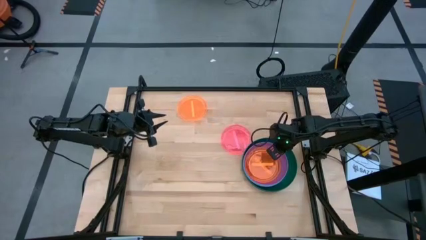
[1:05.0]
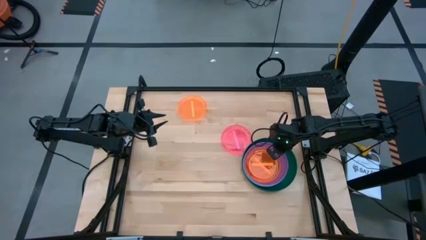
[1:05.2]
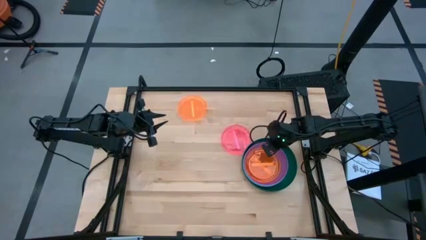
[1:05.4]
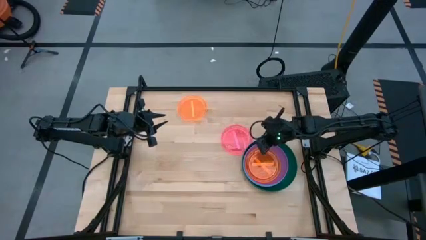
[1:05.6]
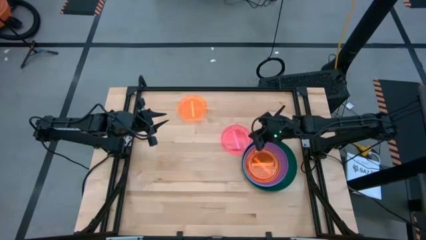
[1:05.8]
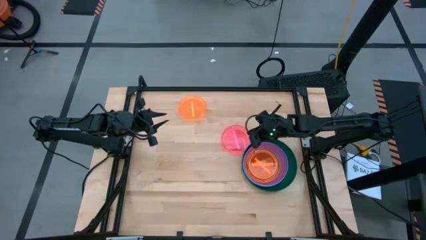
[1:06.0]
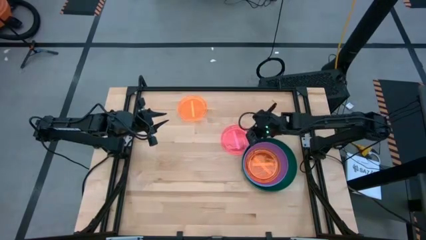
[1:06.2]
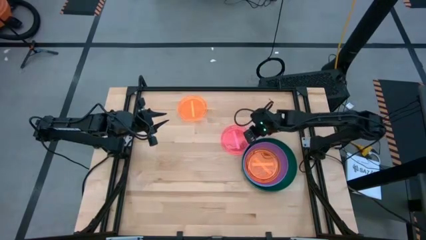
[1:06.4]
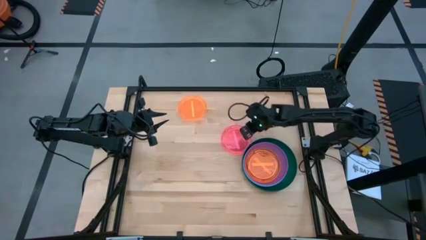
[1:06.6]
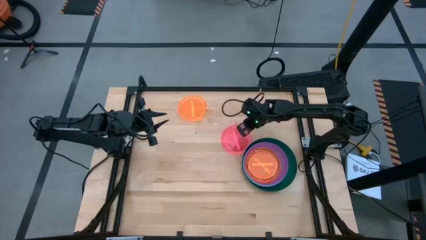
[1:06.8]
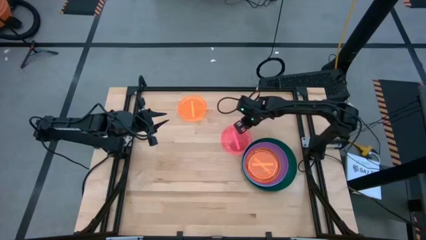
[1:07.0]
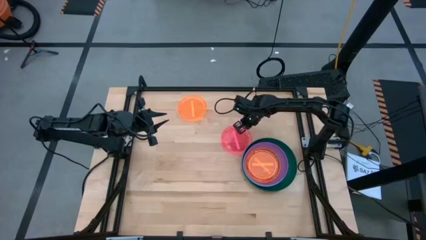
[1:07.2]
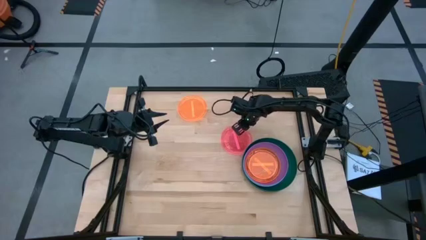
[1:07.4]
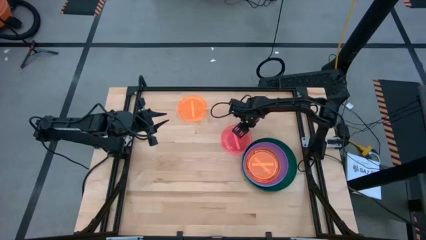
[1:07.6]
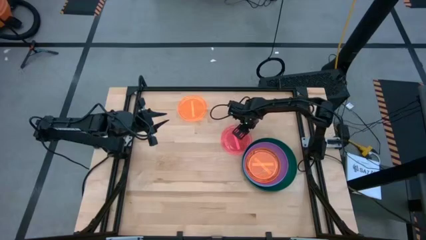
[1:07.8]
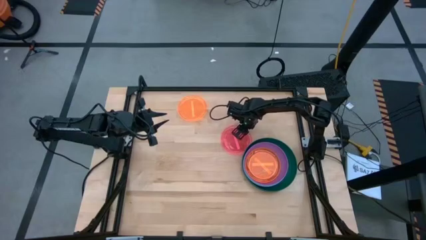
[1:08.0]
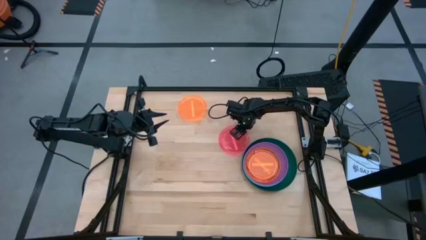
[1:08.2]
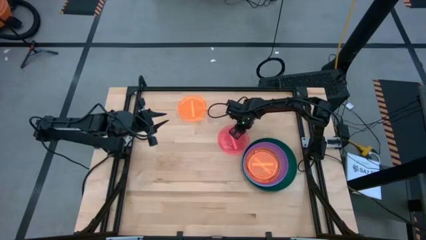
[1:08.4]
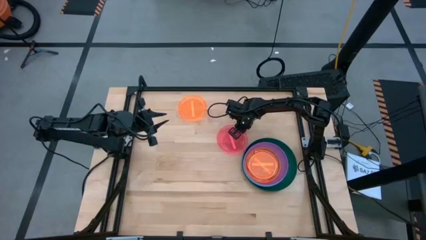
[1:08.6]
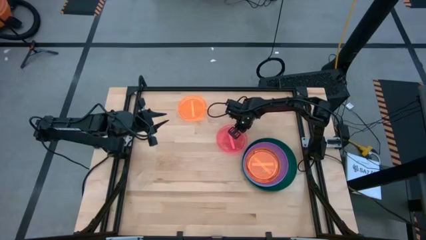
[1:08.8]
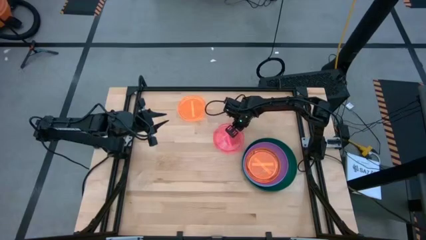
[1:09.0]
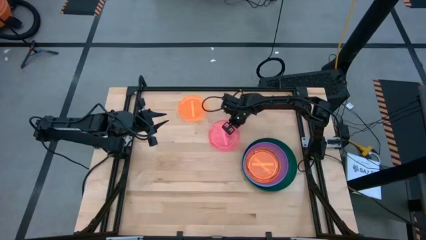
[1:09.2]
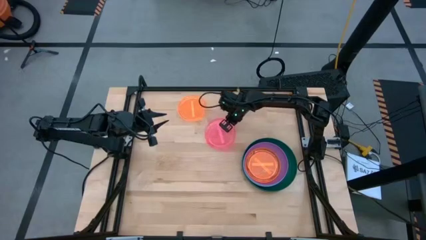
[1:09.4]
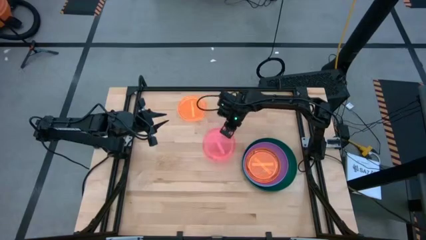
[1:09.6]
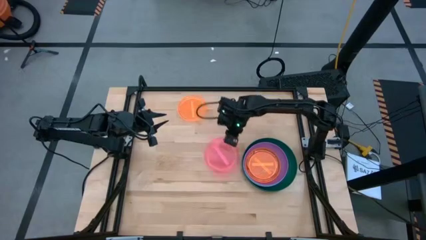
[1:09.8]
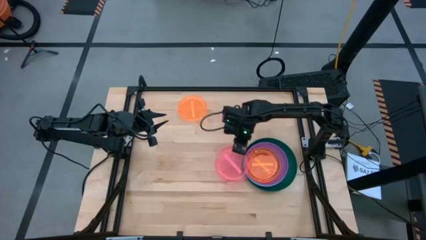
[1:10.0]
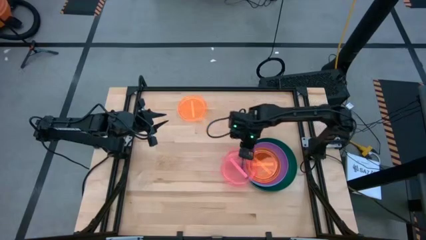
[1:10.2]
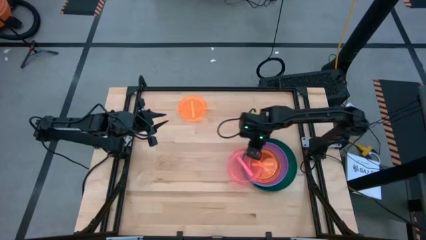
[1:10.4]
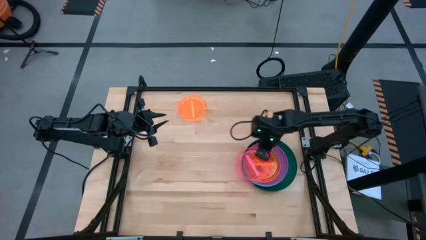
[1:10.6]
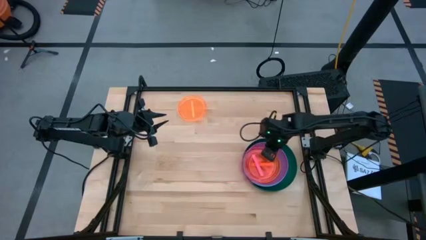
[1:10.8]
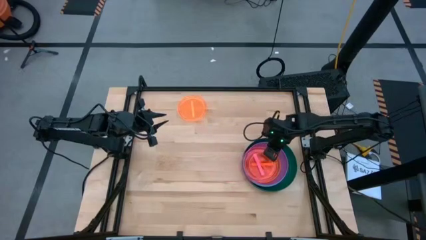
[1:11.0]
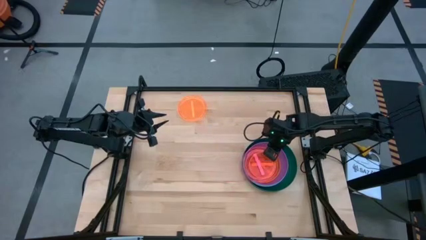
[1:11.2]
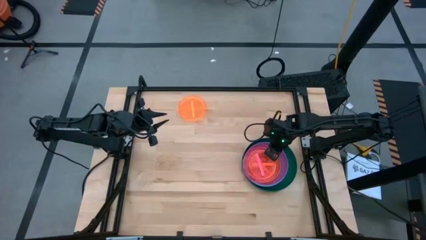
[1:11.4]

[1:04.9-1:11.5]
Task: Stack plastic plates
Stack the small pink plate on top of the bottom small orange plate

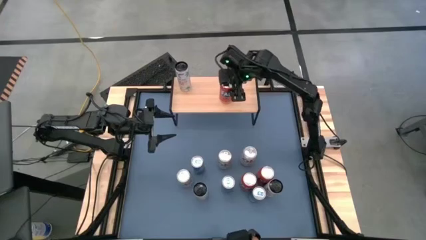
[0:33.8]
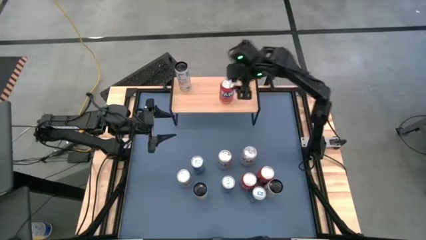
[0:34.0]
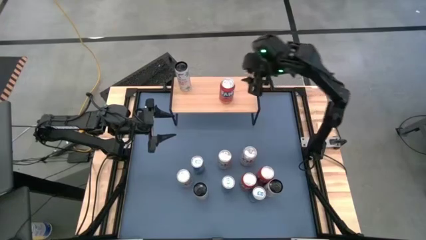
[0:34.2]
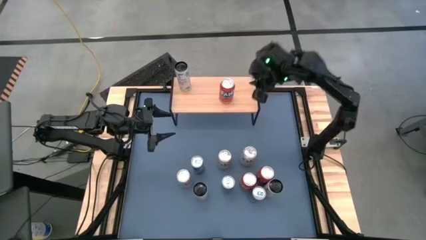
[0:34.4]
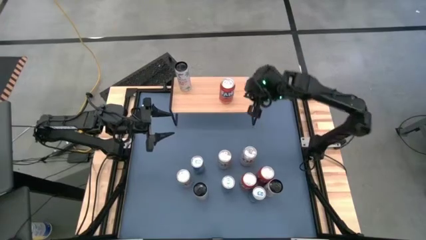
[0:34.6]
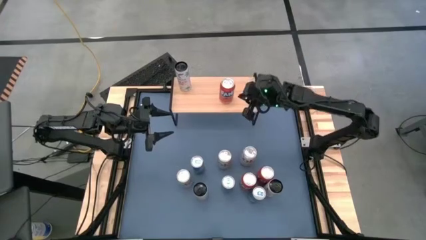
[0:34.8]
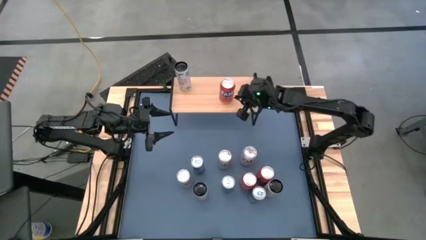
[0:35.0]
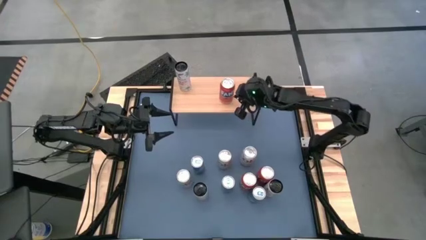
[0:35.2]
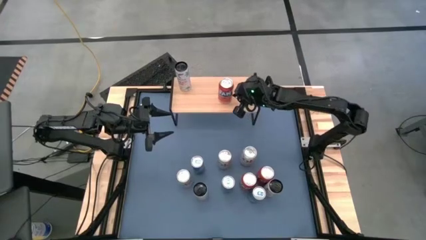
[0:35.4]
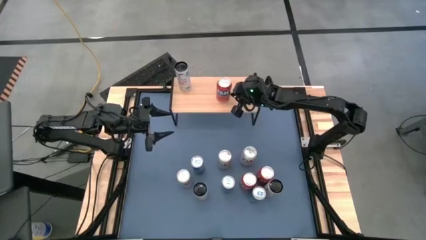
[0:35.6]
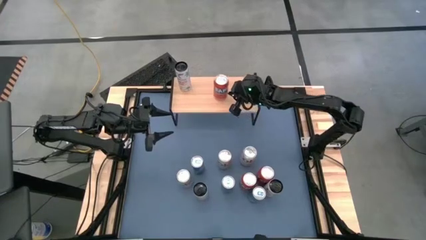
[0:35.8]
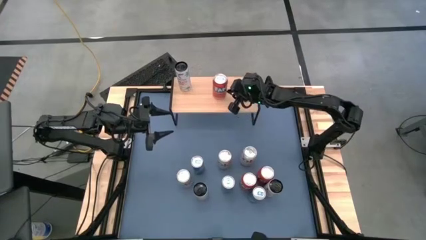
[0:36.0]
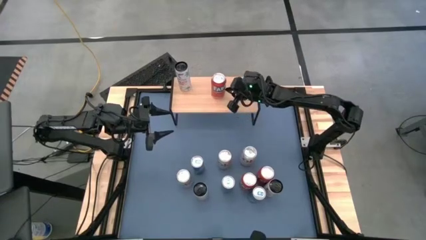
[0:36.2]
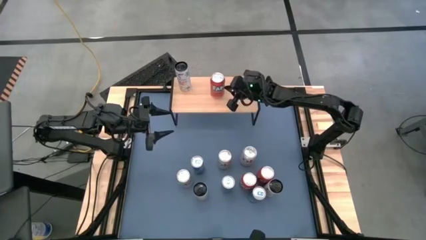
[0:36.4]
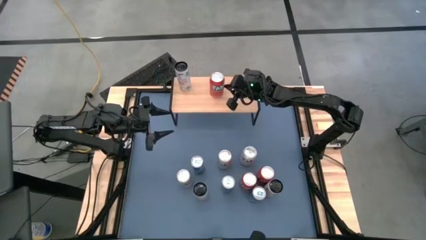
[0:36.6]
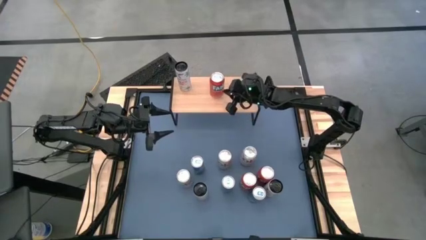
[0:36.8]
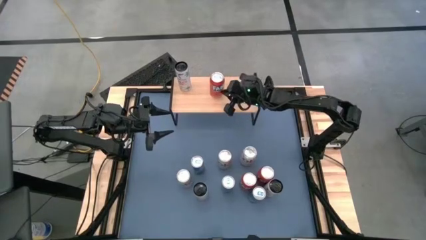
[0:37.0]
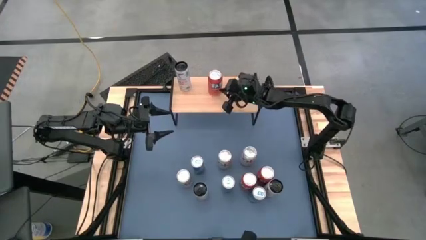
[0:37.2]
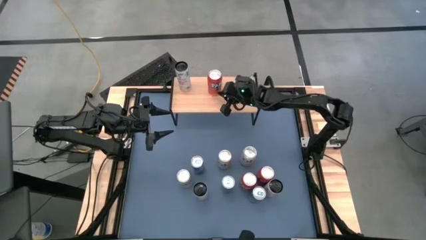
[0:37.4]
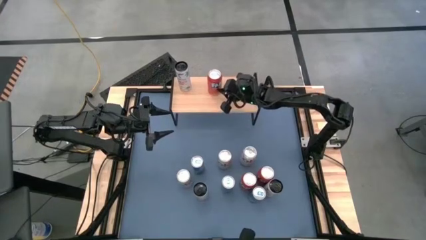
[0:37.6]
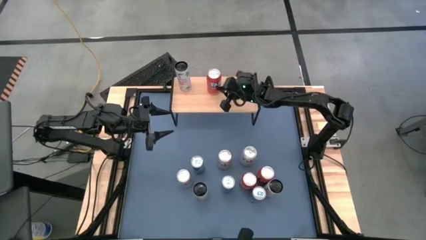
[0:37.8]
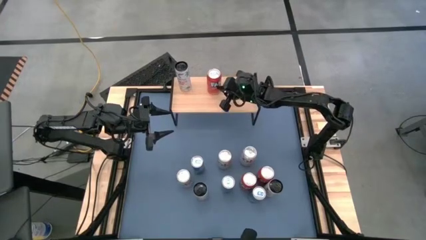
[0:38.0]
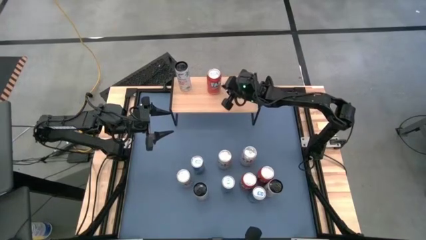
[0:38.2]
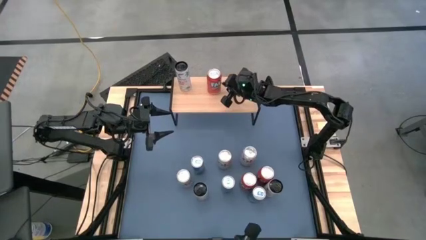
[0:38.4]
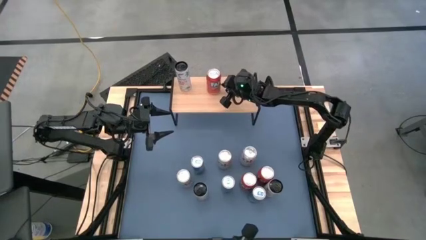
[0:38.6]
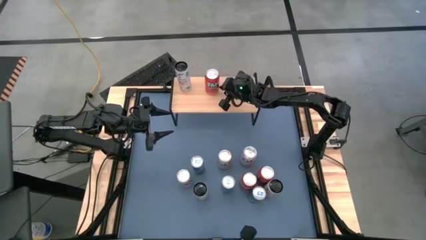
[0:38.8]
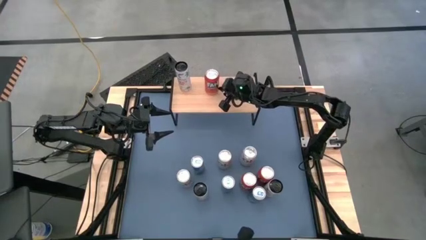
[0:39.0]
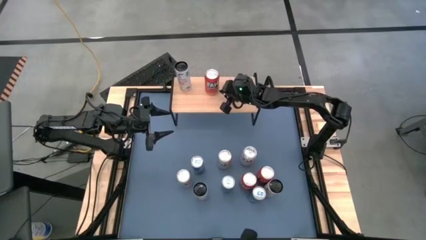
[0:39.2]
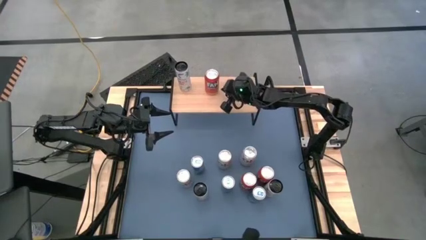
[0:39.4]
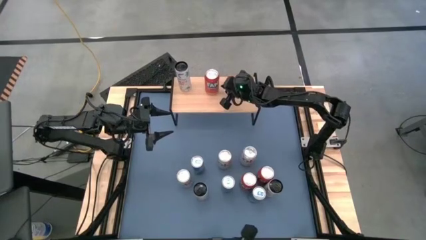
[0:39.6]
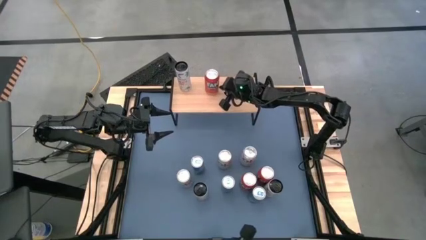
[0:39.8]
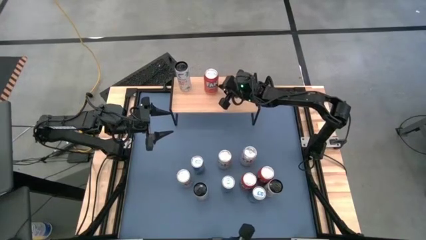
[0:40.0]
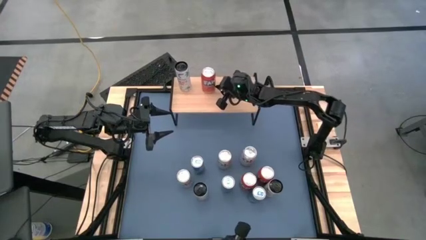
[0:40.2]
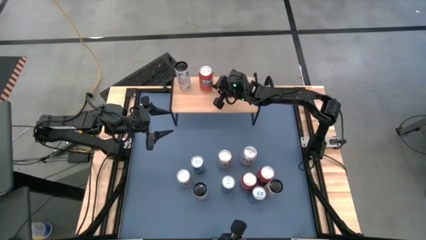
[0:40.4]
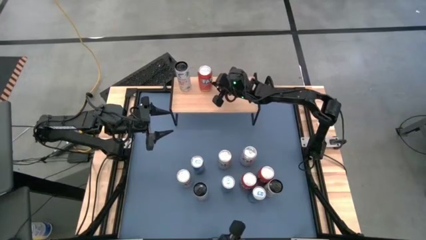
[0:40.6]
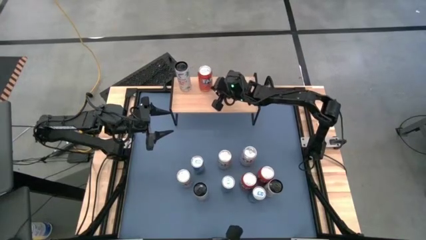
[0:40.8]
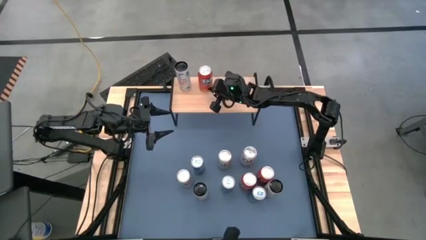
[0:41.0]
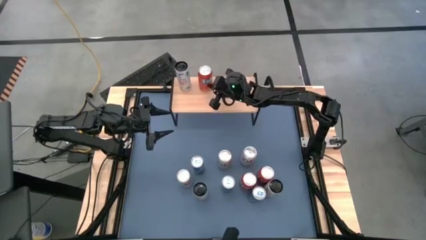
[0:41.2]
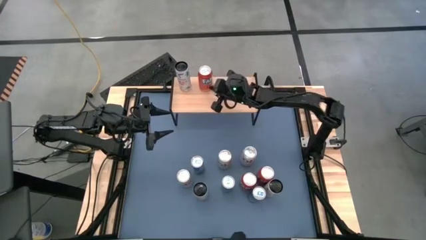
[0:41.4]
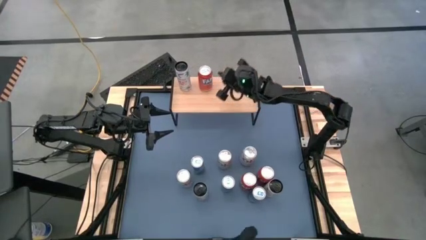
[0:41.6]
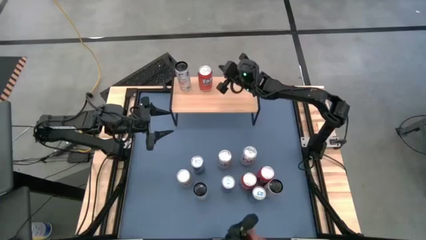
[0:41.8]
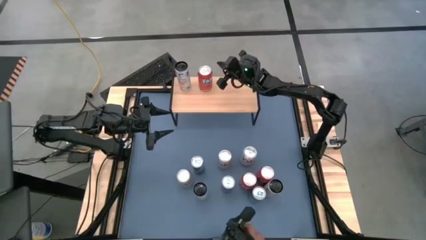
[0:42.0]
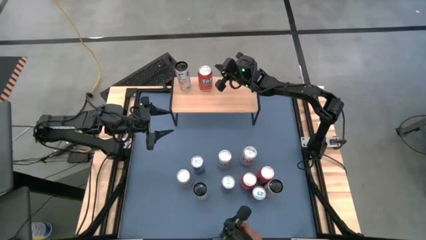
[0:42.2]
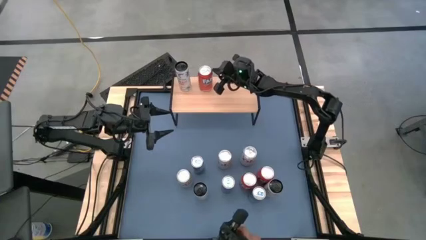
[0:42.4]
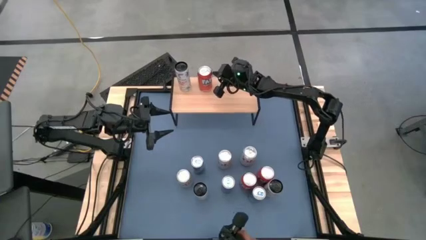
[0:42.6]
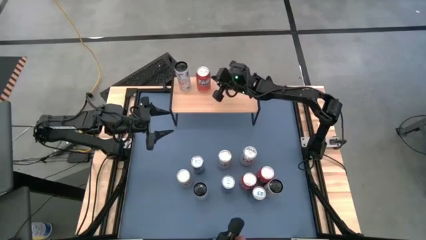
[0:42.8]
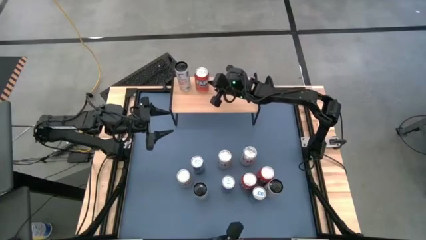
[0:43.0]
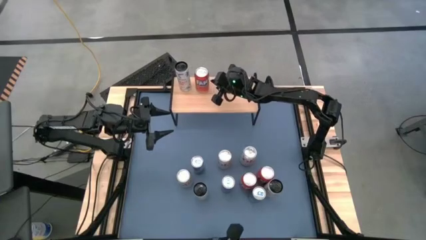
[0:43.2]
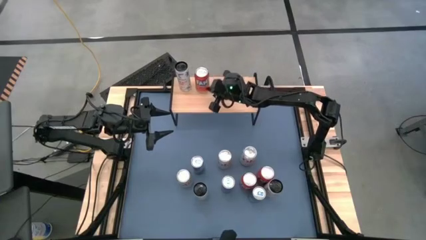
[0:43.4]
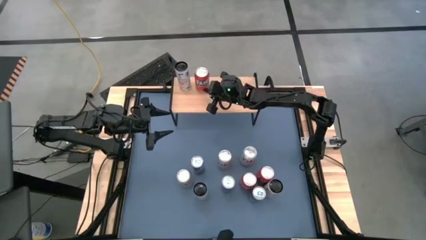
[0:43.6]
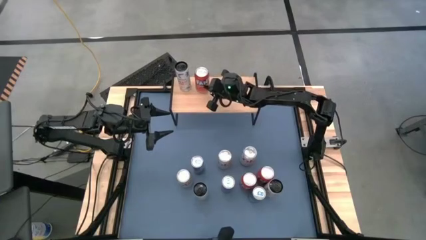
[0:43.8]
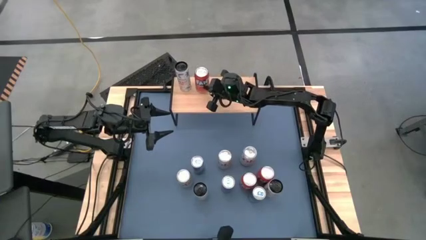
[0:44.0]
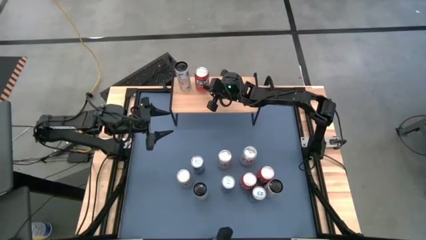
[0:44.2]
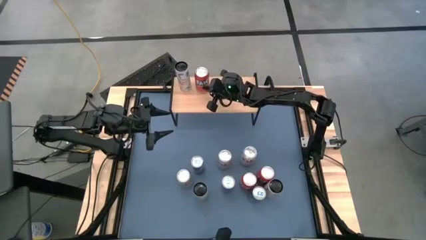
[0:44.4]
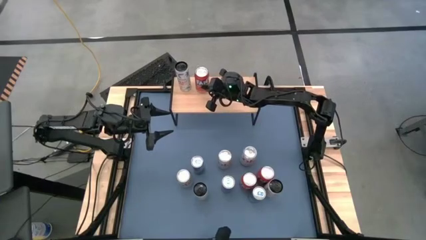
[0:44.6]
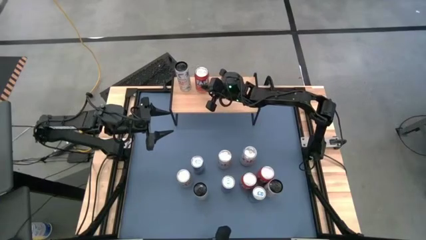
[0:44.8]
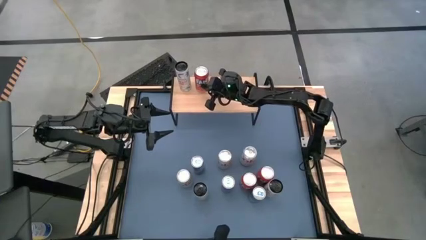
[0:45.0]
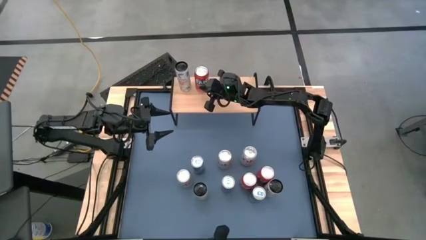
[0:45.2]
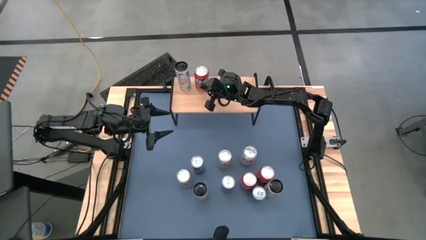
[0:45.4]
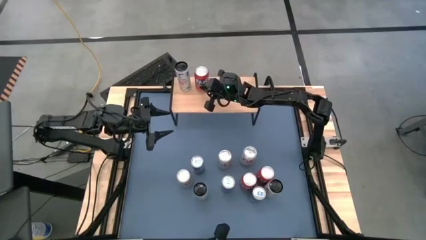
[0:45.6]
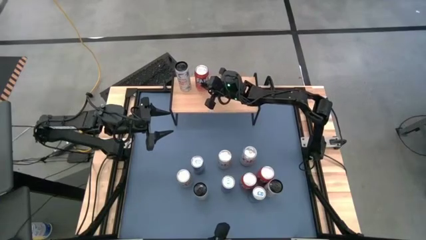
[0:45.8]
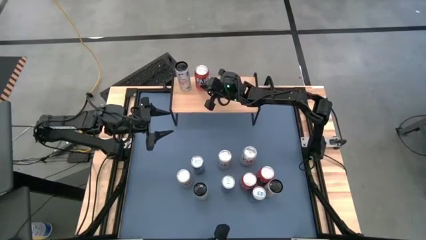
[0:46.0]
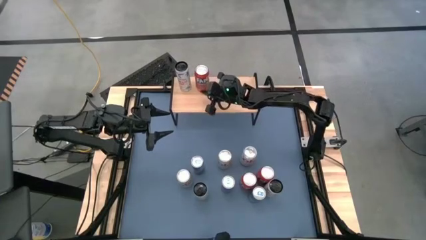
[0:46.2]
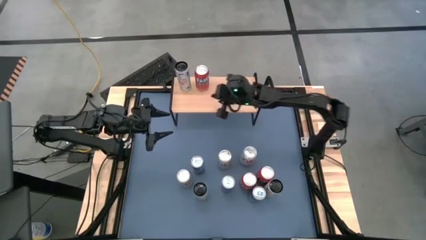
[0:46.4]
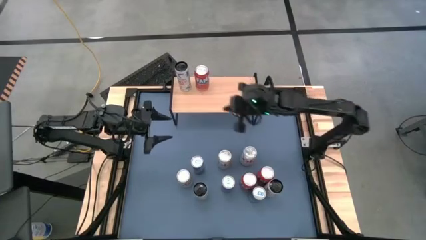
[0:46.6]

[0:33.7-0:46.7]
Task: Place canned beverage on shelf
Adjust the orange soda can
